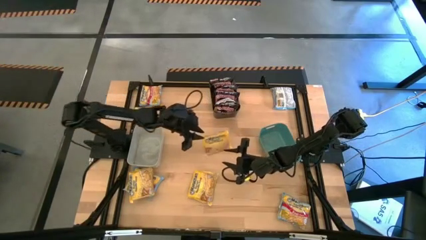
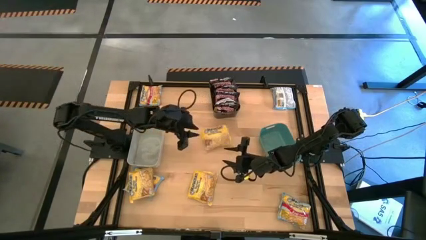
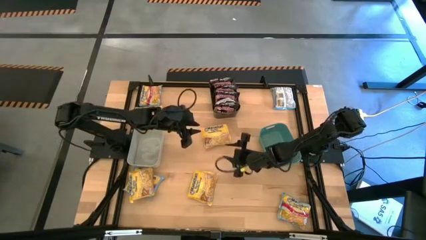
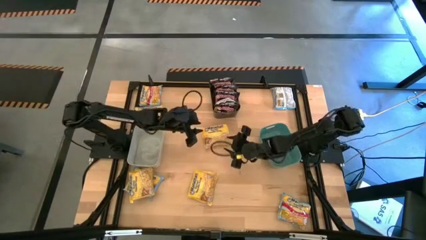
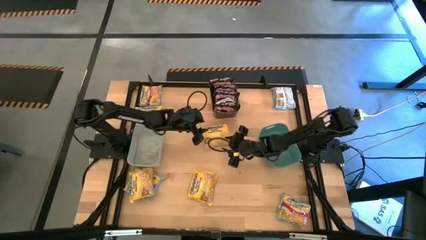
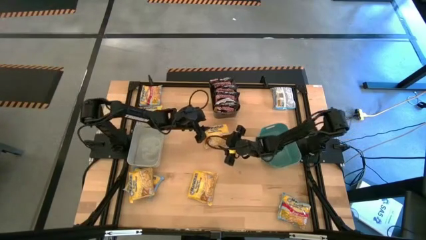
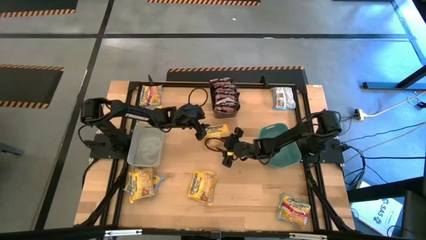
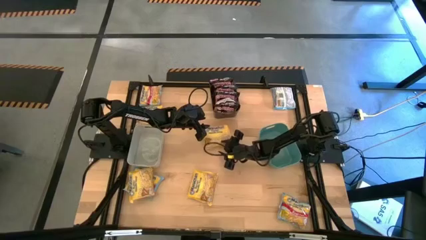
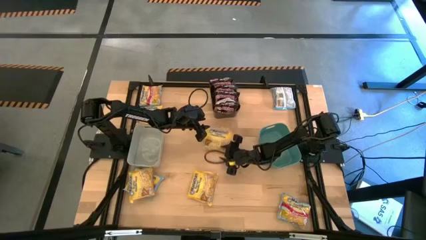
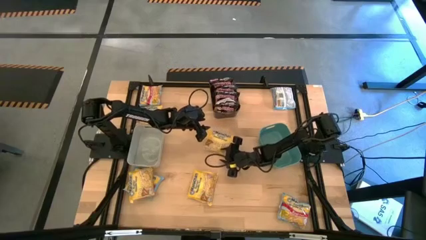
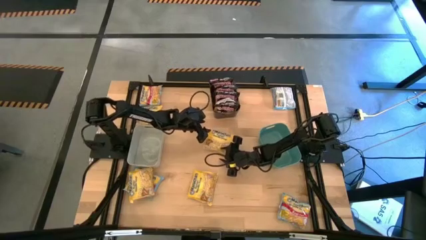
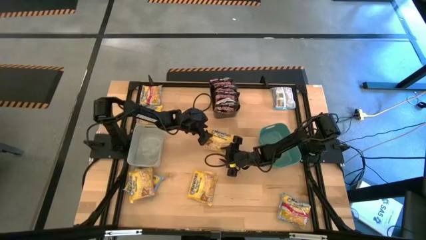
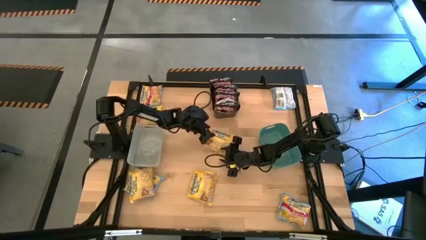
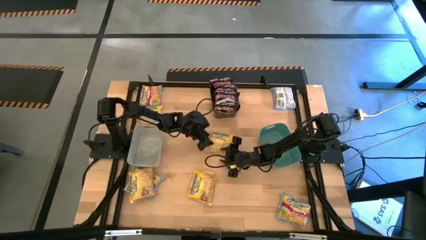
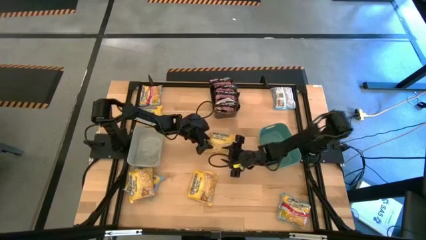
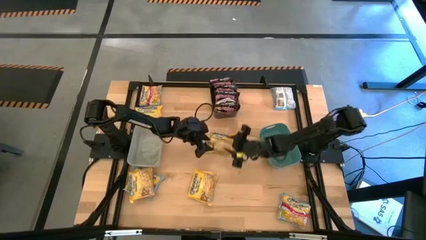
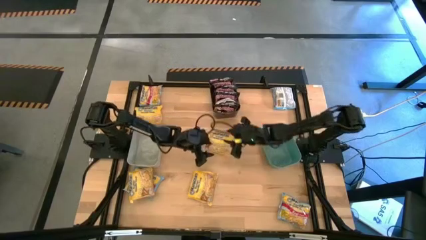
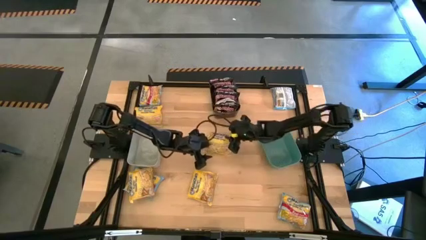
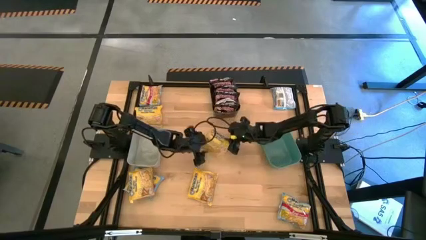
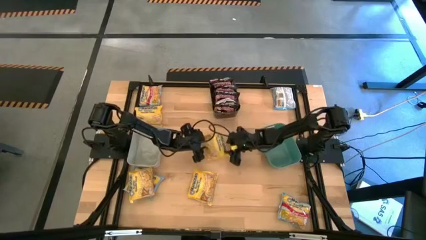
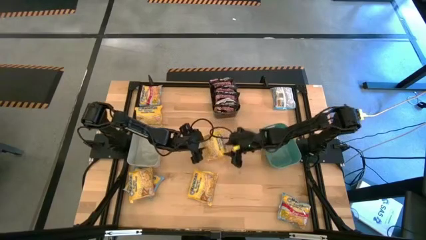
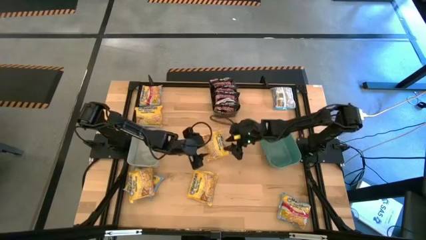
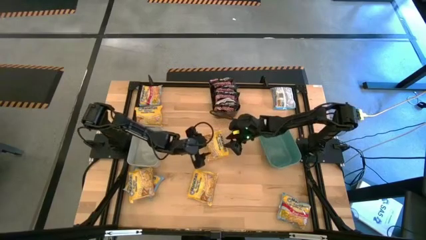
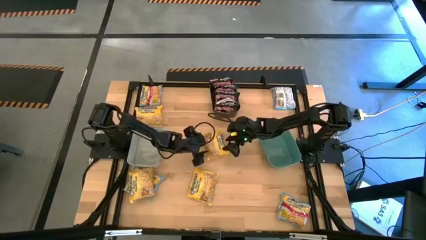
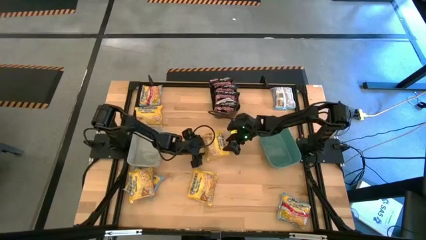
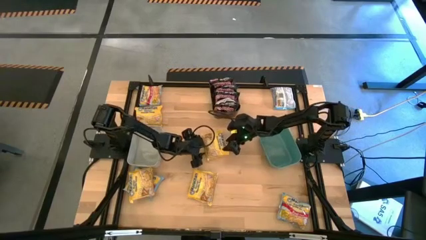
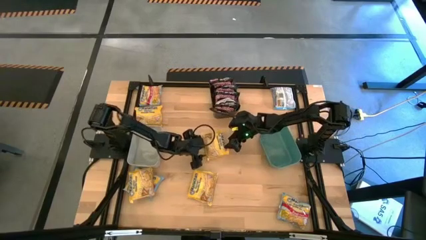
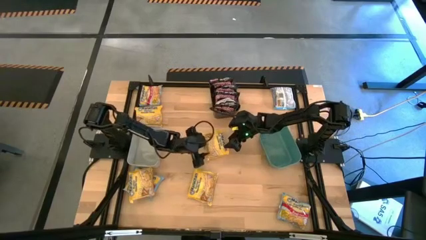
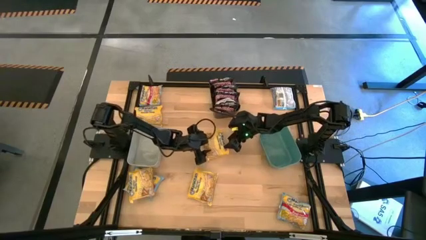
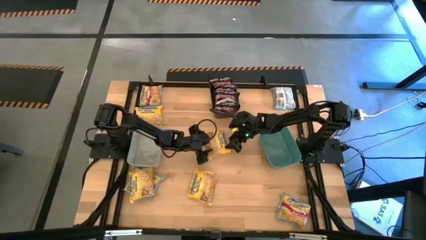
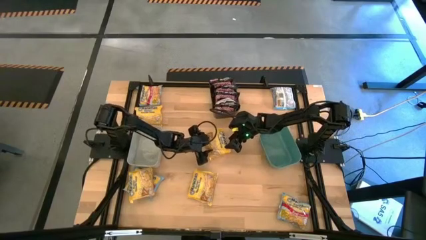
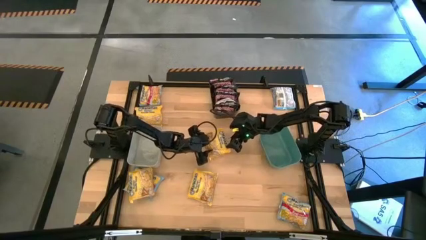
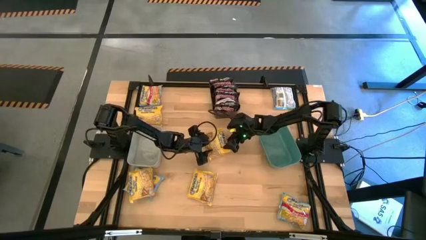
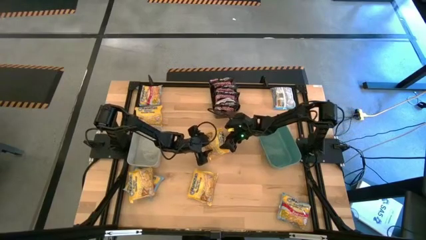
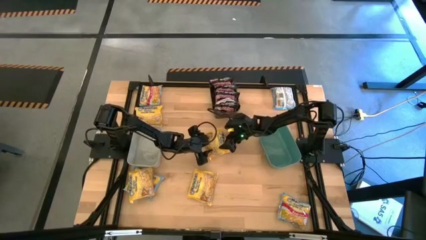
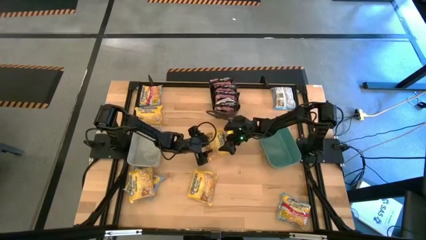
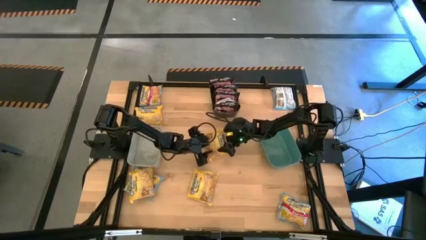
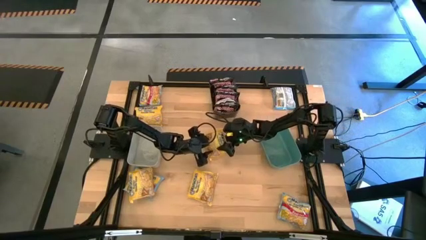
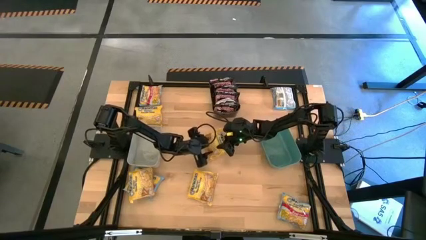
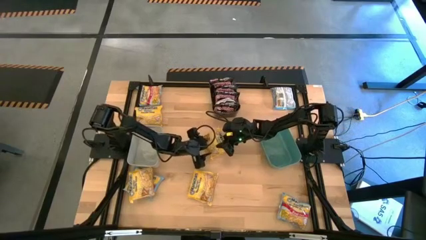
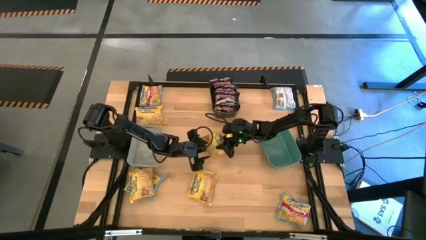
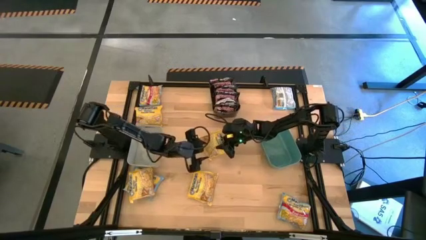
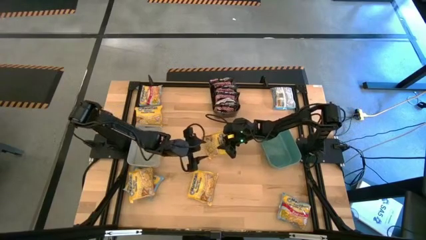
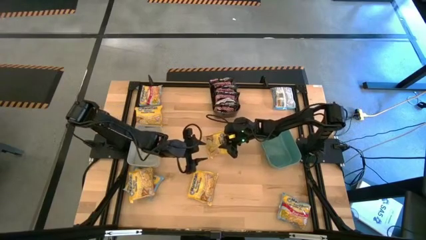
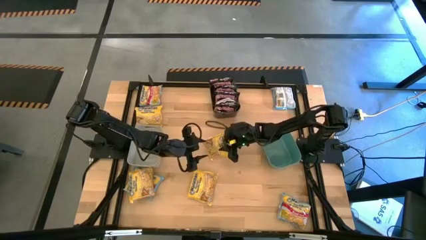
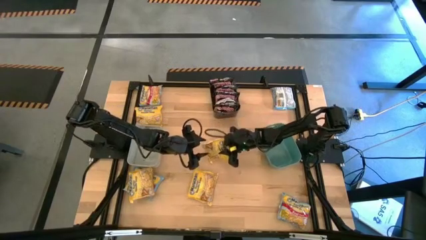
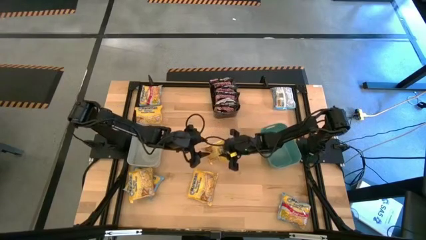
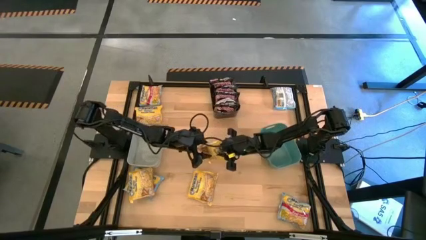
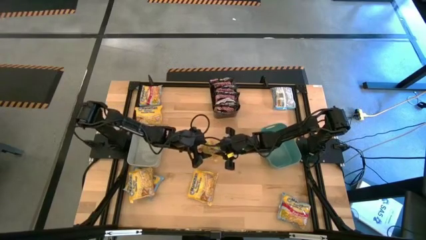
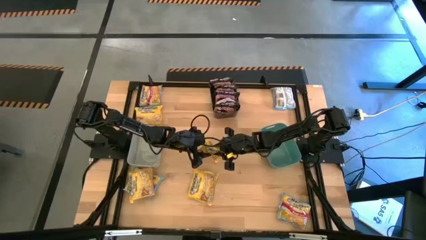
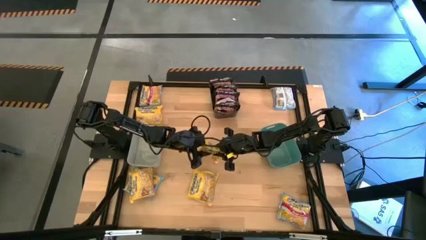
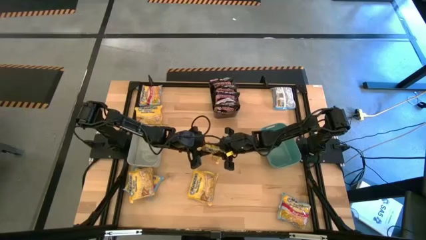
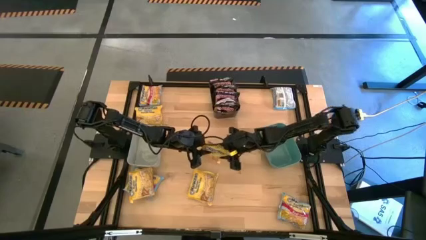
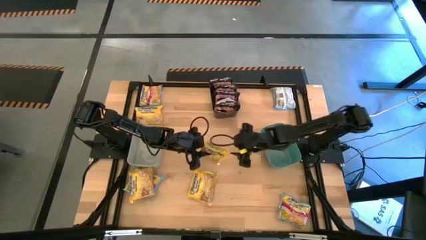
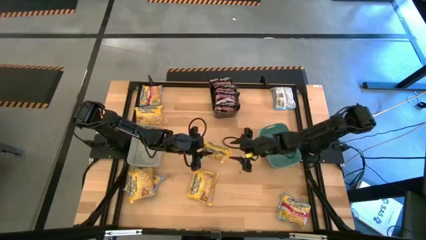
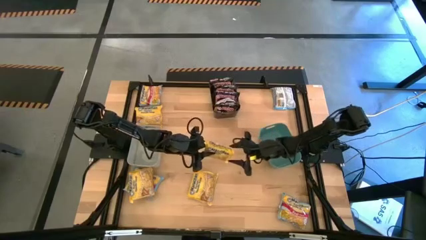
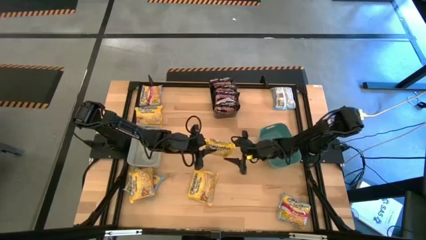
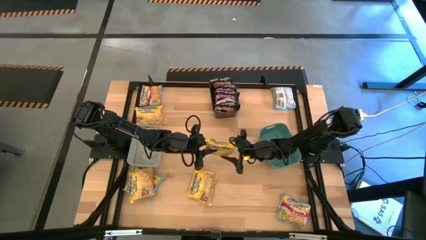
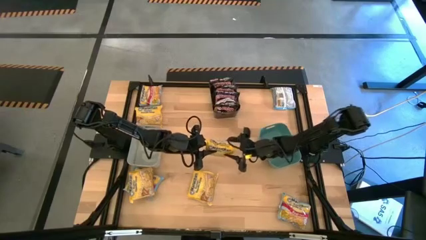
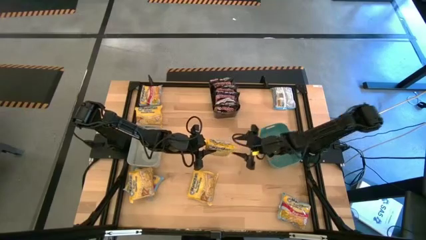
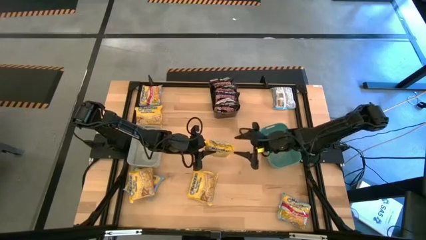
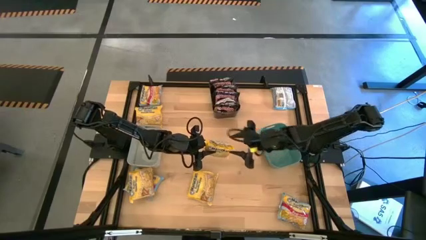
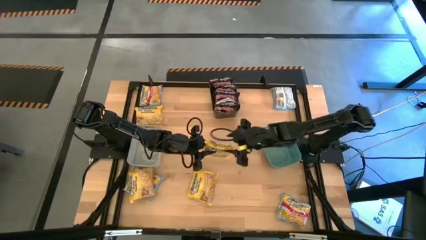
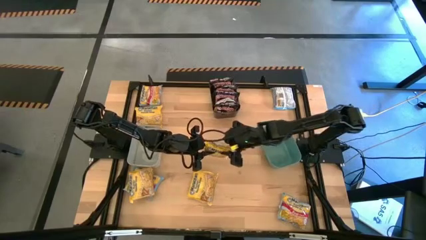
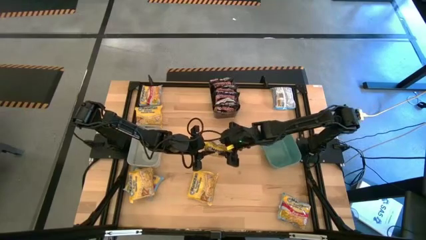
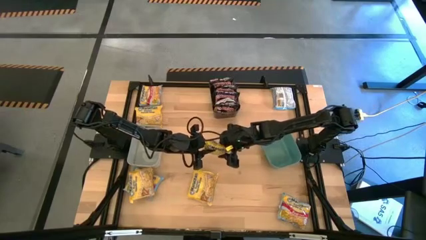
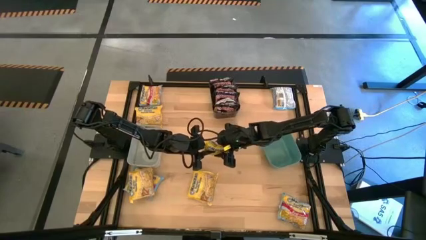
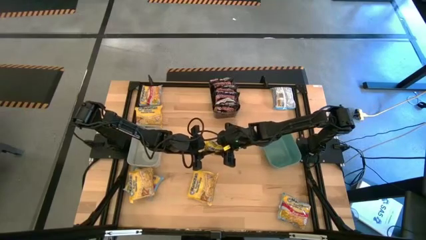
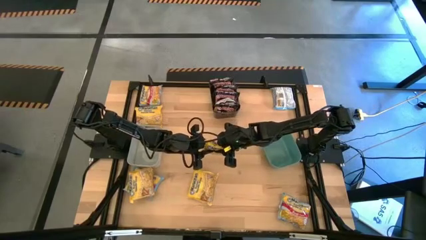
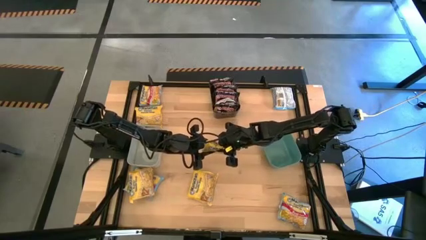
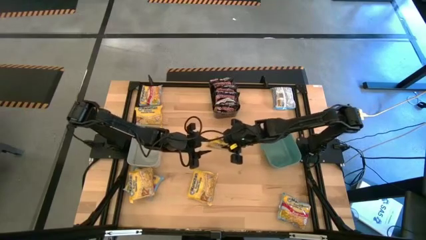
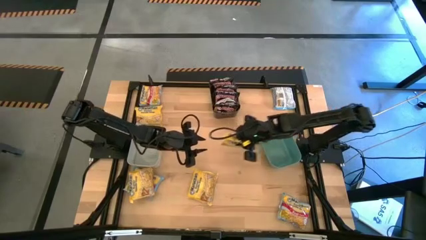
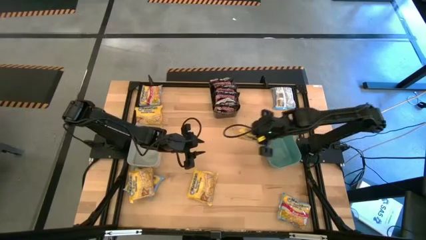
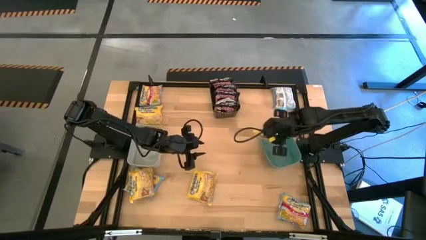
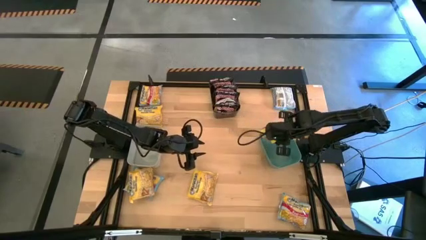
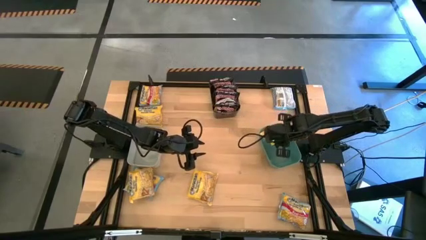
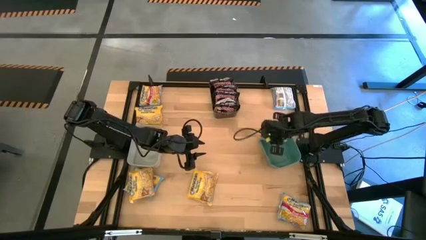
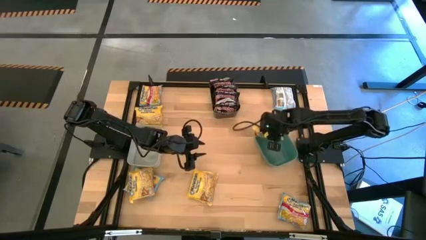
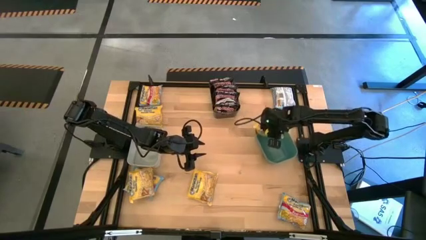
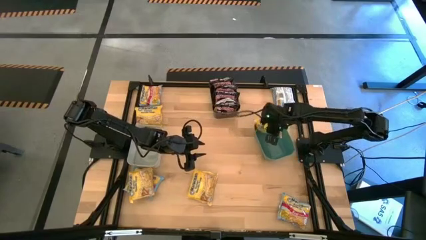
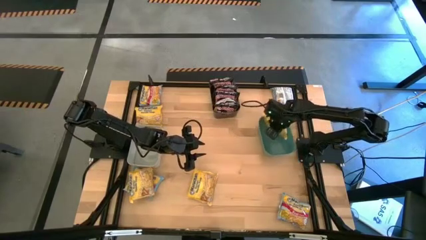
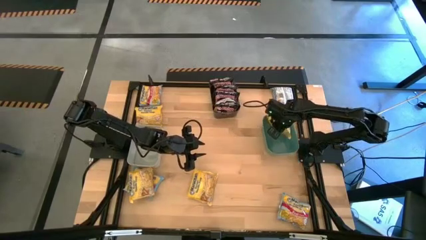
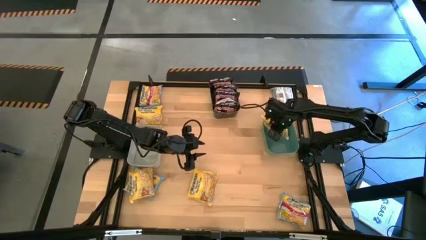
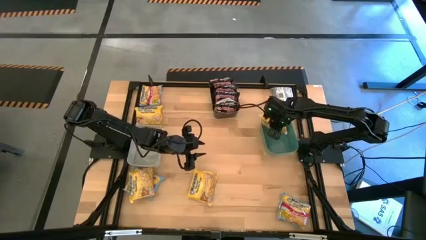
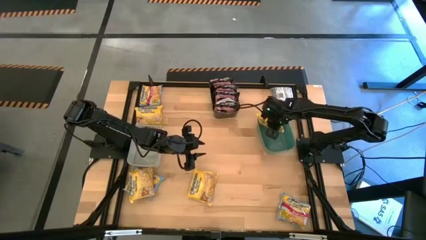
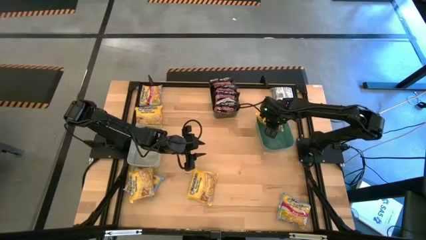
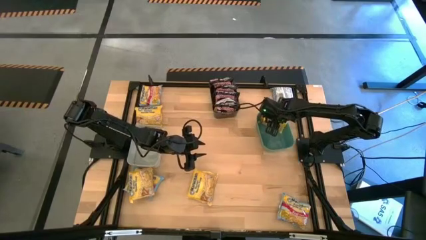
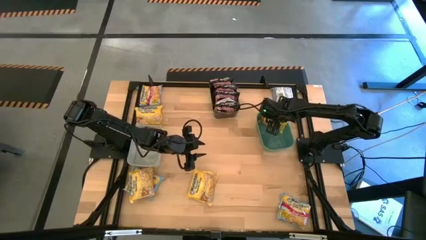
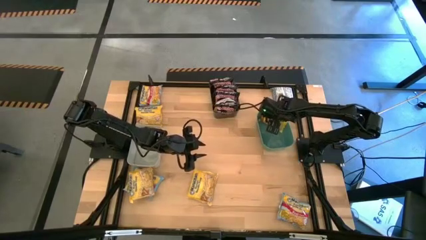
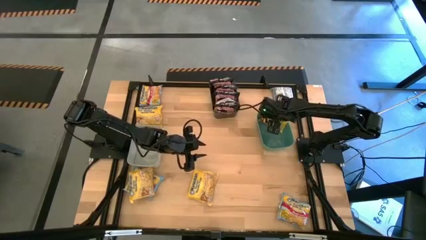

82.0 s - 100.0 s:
Task: Sort Maruchan noodles
Put the yellow noodle pack into the blue bin
